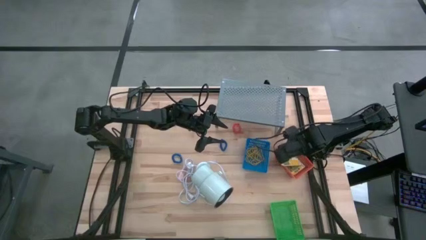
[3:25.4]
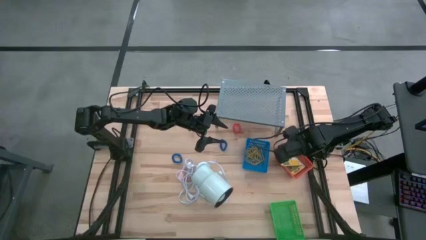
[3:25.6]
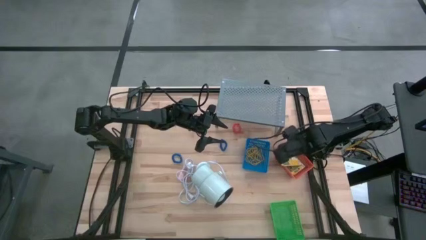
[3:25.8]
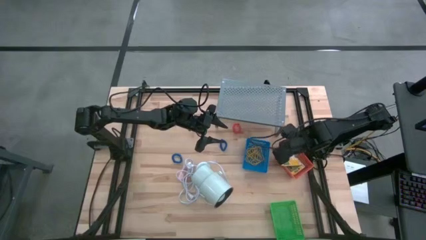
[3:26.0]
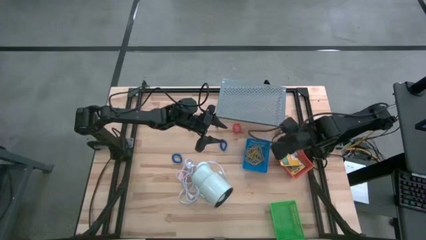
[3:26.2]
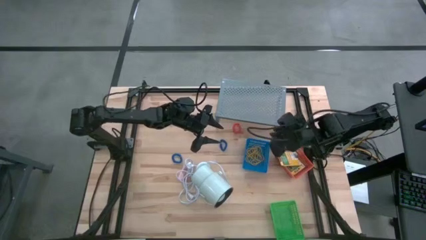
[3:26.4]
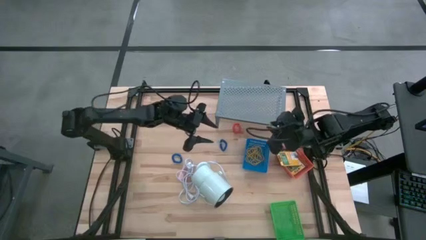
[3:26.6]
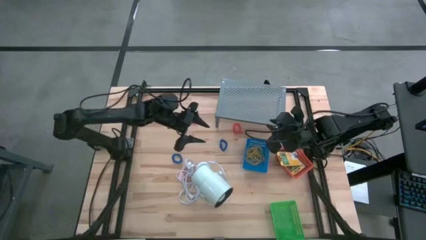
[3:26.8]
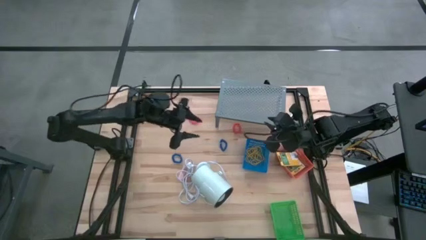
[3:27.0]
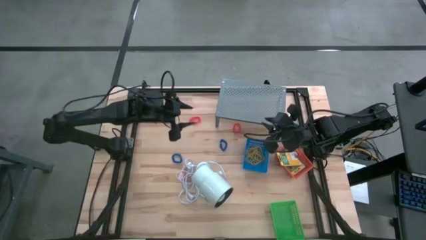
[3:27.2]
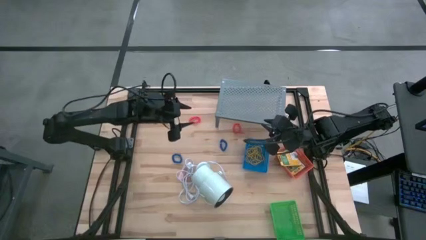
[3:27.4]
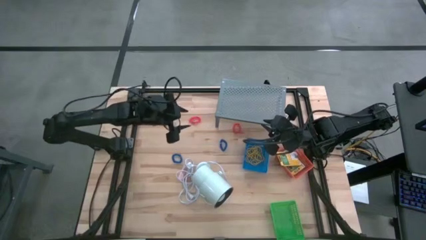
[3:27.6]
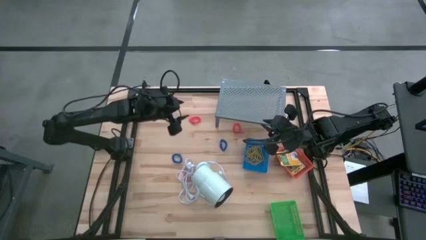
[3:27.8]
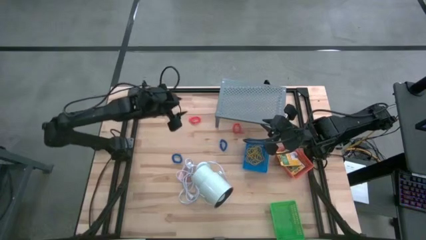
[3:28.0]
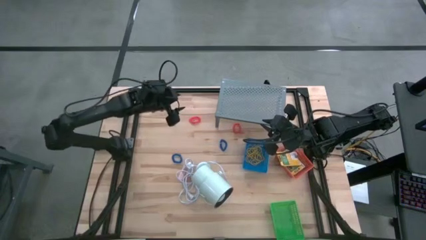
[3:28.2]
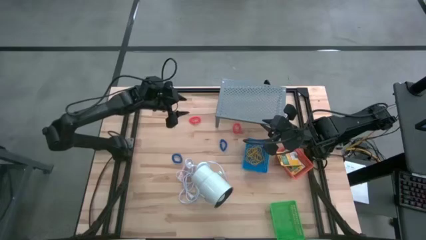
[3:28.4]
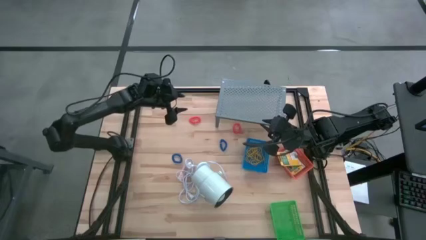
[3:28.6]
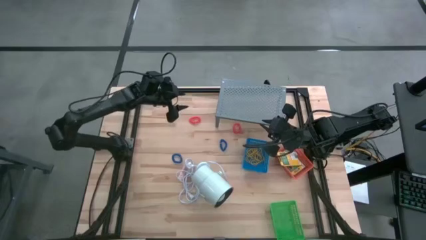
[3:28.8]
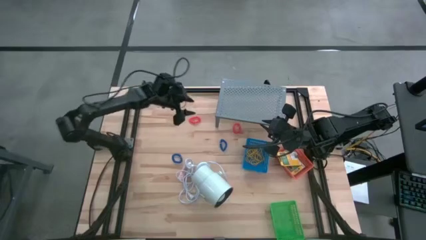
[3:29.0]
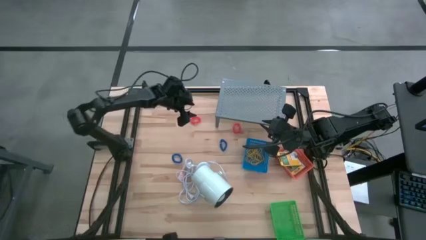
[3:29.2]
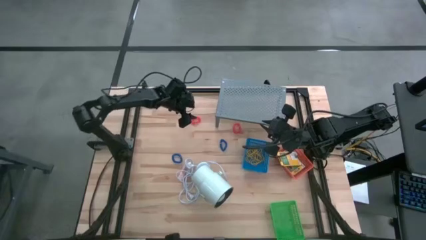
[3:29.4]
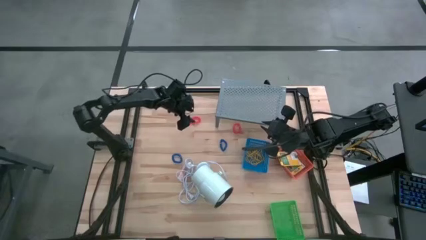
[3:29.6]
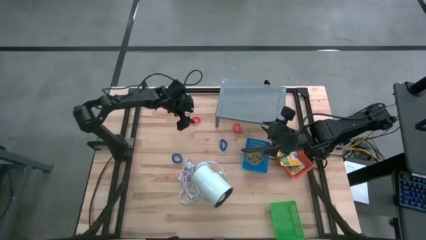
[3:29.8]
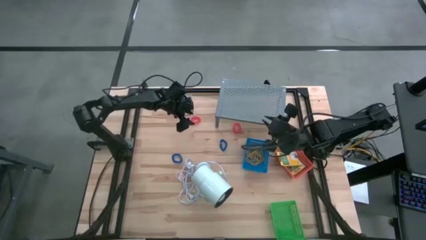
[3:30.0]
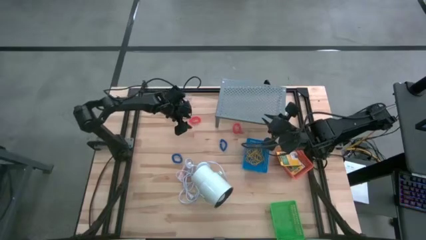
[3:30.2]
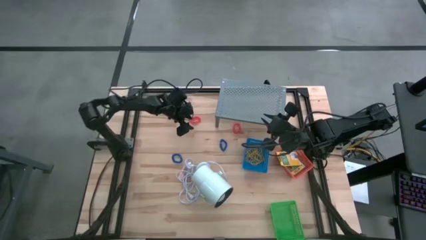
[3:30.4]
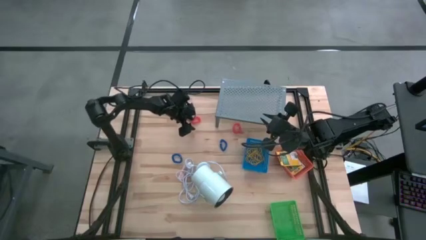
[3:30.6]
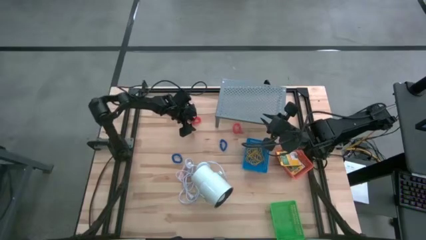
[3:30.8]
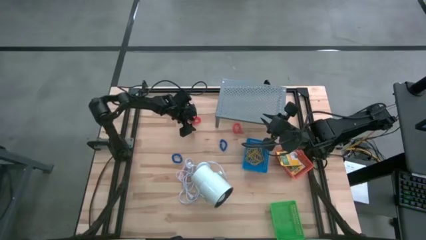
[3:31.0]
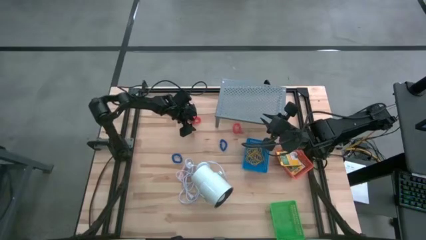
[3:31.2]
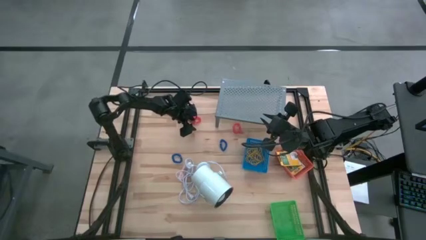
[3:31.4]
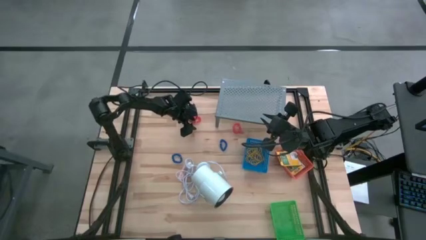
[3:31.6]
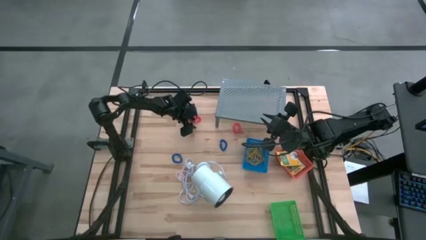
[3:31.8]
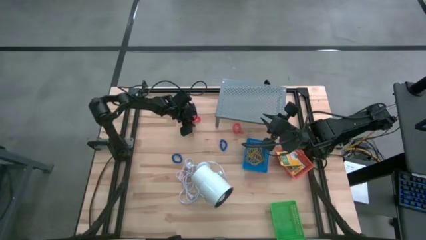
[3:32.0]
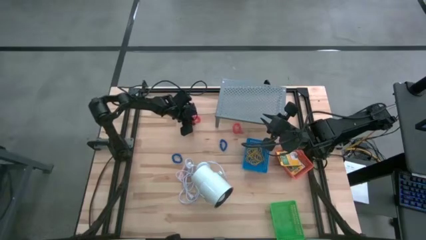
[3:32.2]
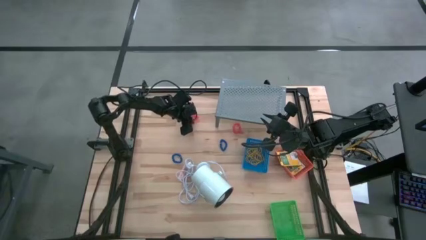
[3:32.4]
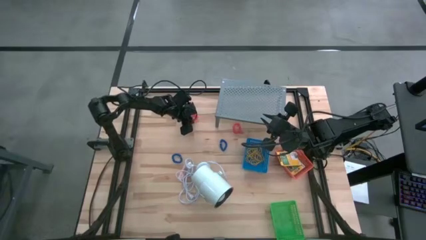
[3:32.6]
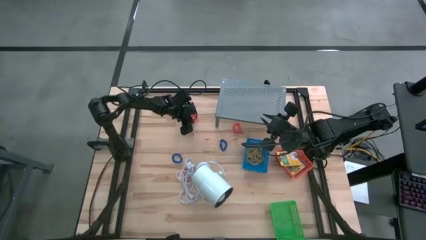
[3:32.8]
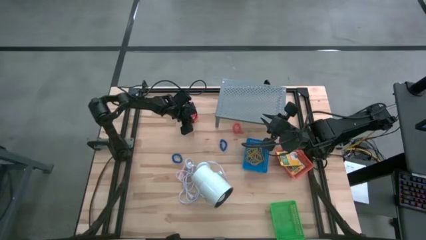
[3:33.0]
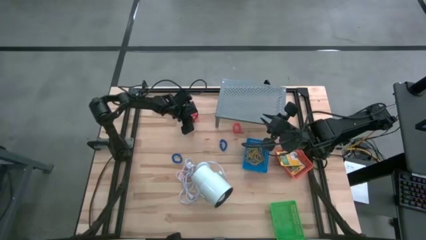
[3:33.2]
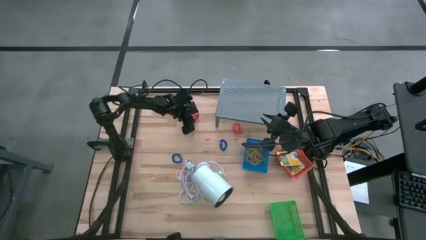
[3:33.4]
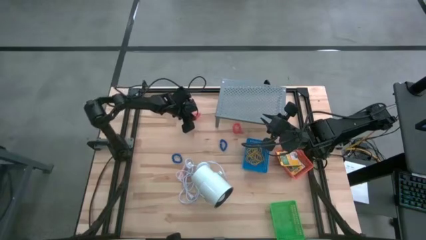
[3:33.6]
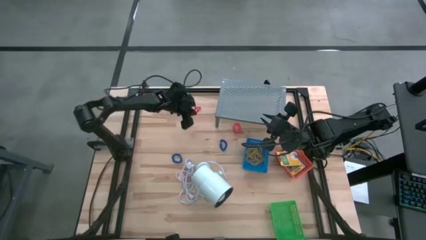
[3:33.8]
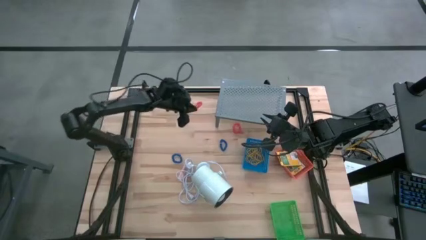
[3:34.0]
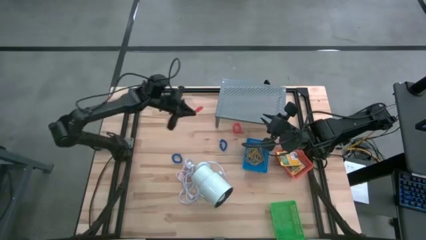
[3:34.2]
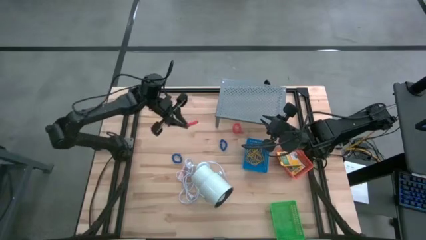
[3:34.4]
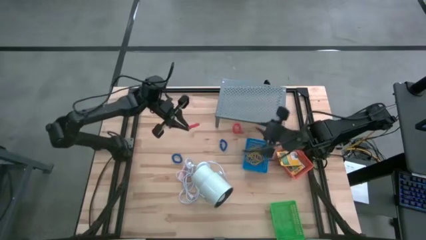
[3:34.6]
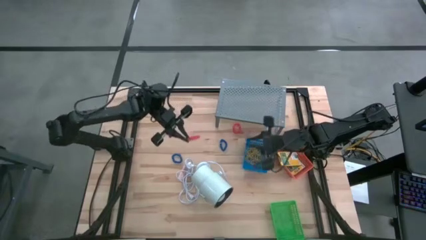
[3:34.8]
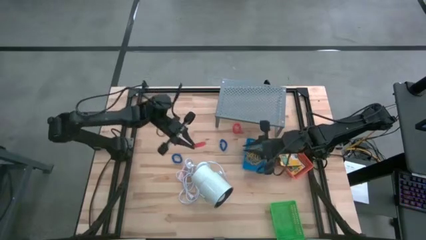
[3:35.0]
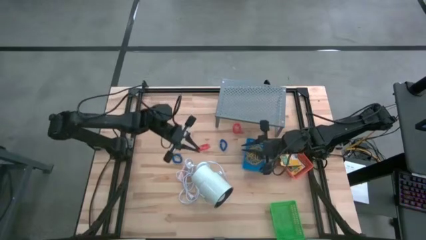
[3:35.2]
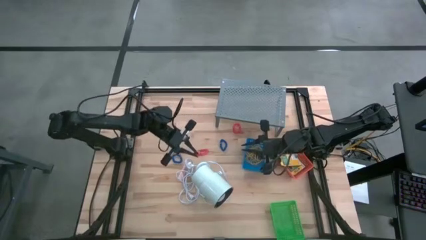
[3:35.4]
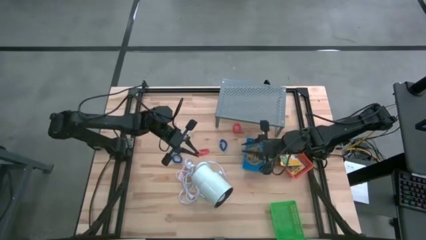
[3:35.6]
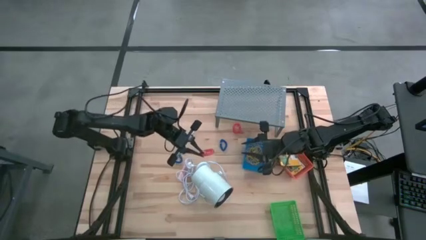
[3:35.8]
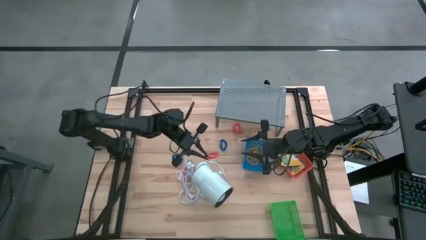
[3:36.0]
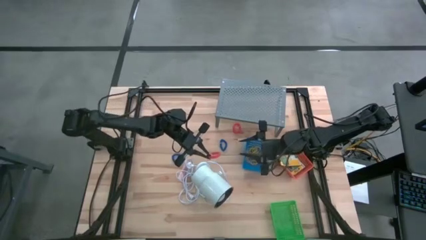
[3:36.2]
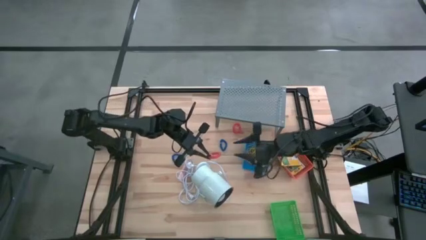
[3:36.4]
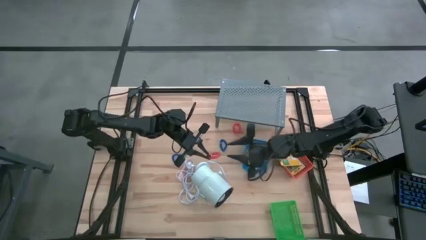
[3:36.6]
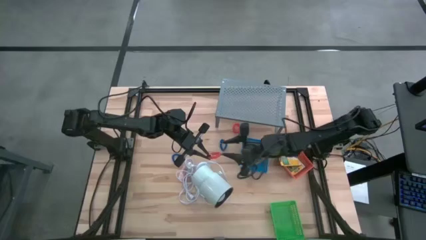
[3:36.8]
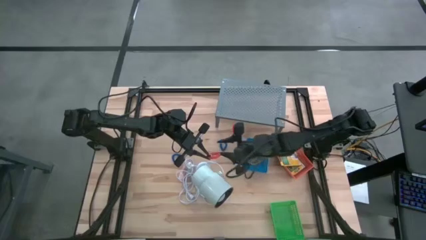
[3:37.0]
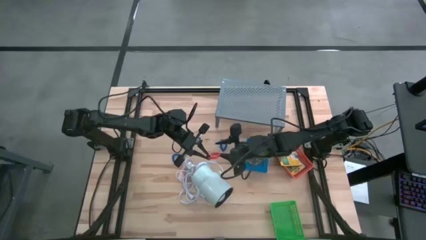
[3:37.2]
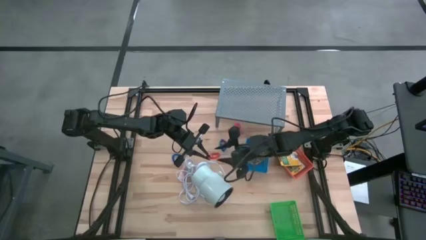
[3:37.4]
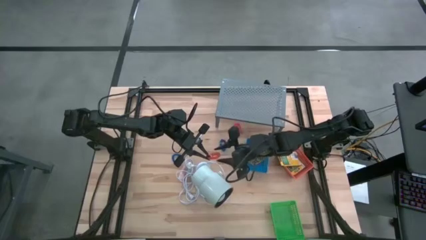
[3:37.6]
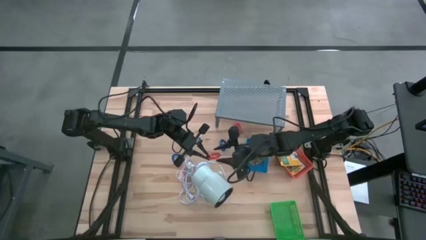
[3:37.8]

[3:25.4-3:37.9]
Task: Pick & Place Office Desk Supplies
Put the orange spring keychain into the green bin
